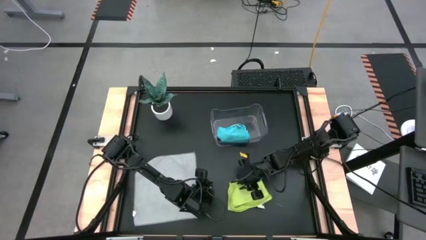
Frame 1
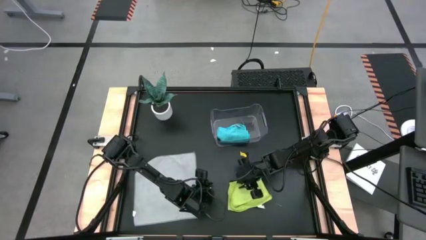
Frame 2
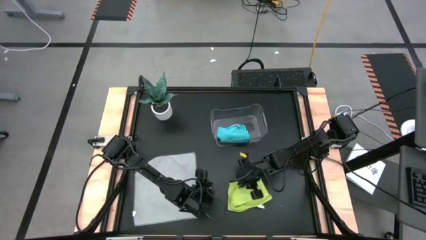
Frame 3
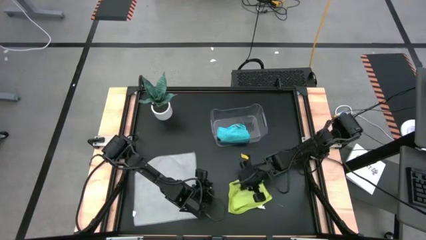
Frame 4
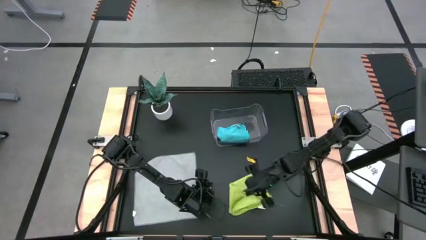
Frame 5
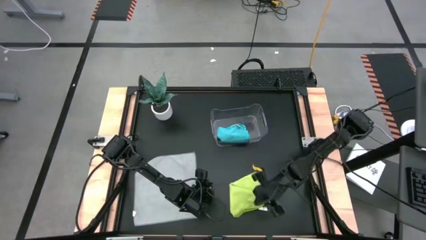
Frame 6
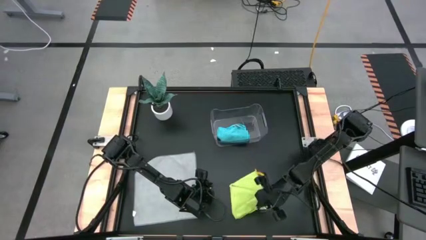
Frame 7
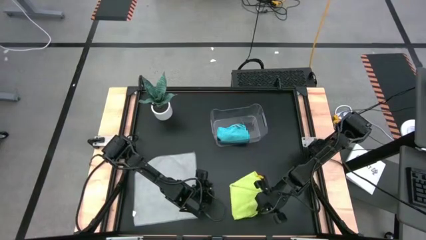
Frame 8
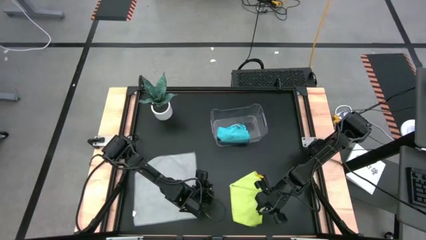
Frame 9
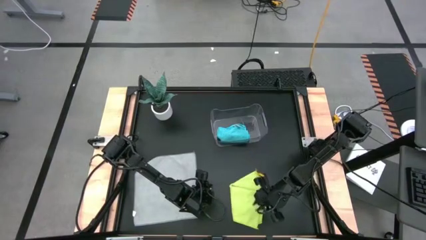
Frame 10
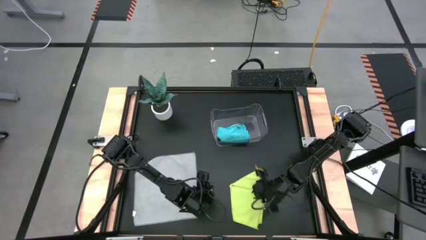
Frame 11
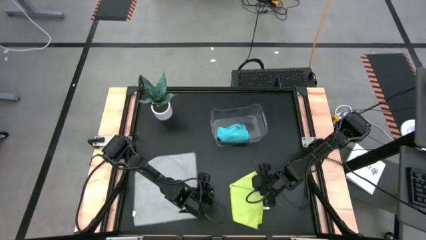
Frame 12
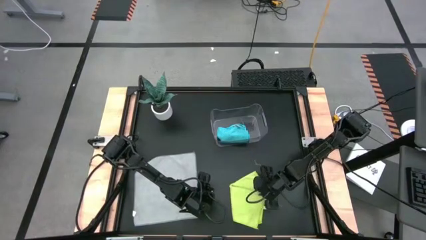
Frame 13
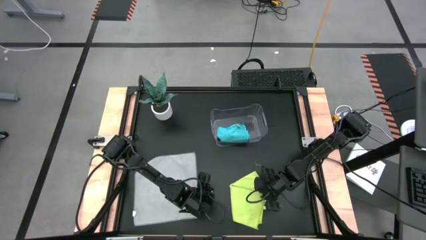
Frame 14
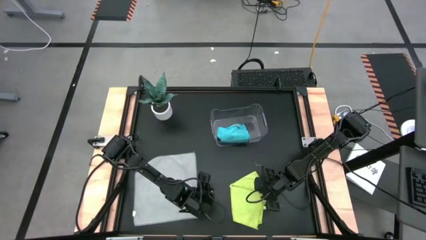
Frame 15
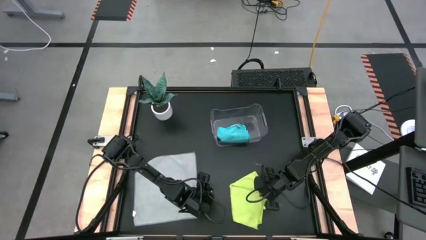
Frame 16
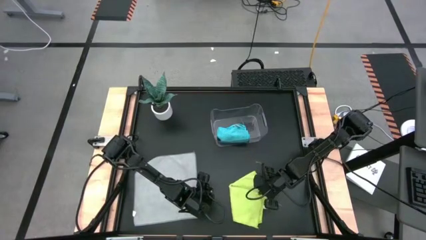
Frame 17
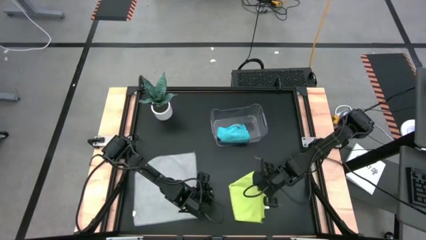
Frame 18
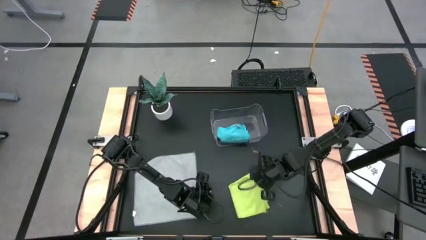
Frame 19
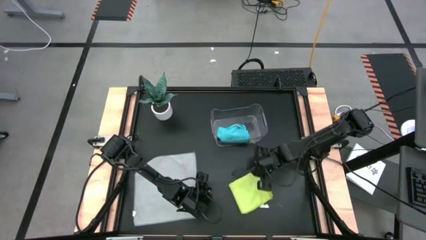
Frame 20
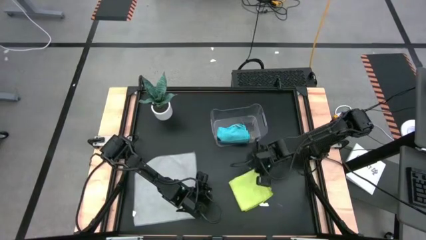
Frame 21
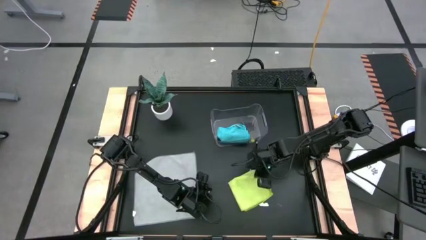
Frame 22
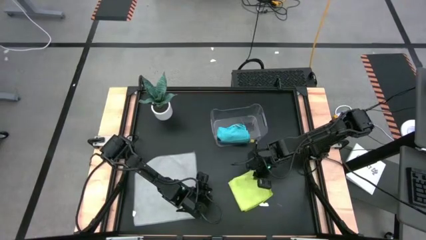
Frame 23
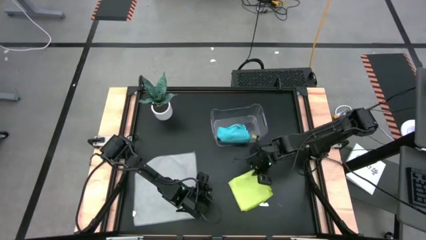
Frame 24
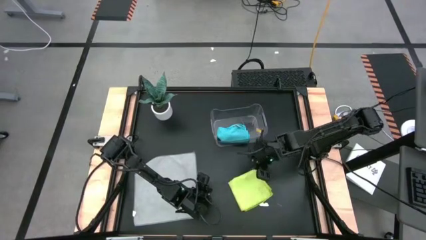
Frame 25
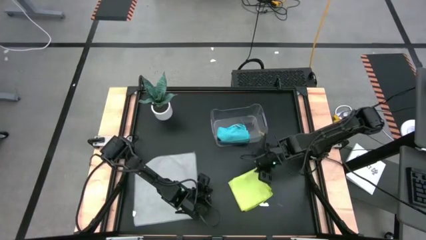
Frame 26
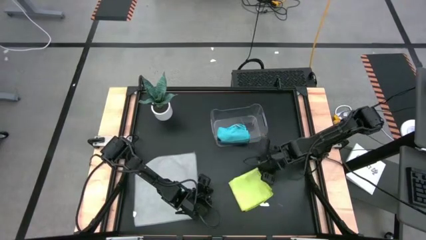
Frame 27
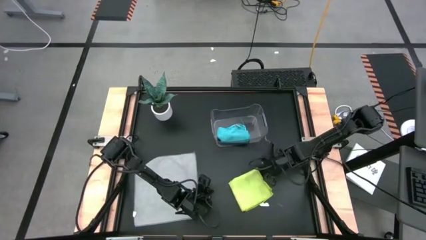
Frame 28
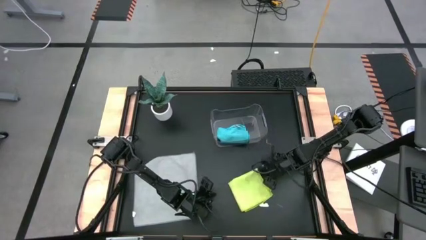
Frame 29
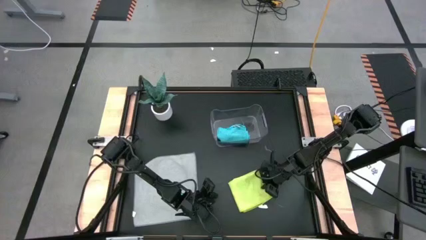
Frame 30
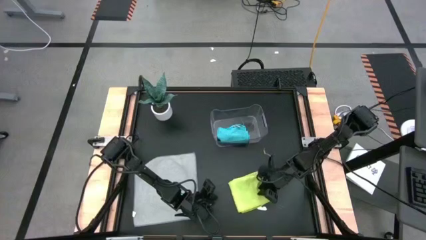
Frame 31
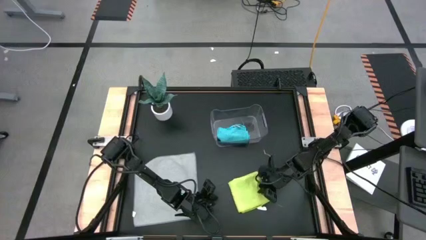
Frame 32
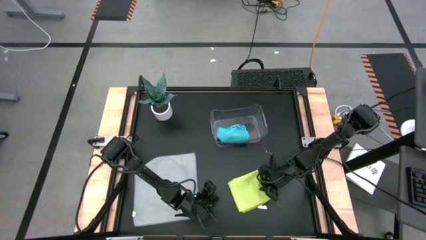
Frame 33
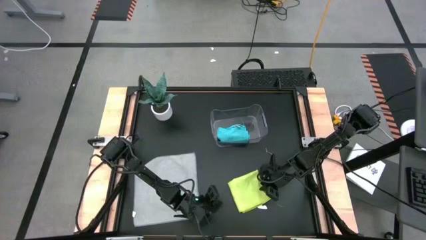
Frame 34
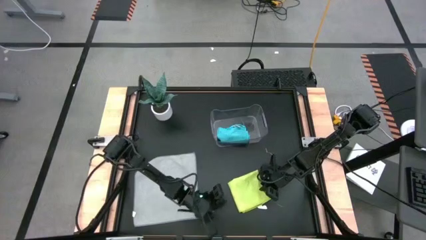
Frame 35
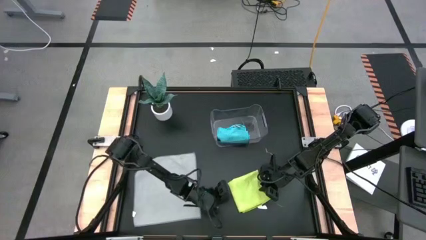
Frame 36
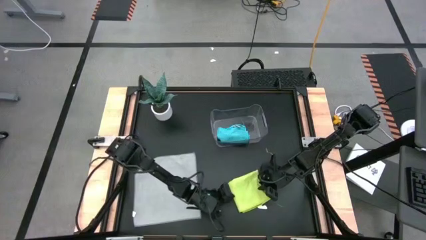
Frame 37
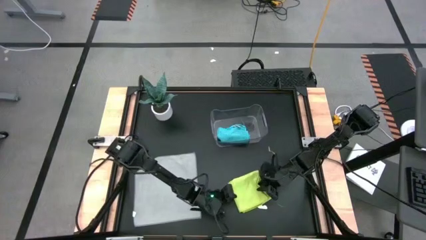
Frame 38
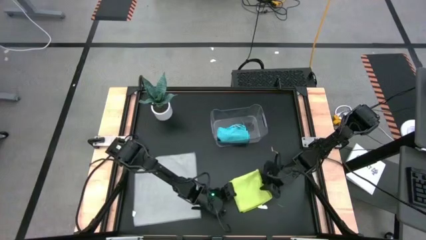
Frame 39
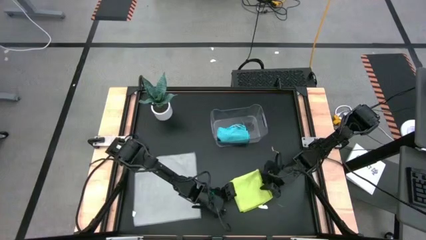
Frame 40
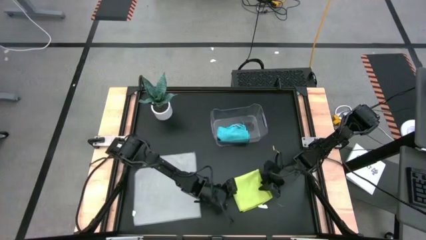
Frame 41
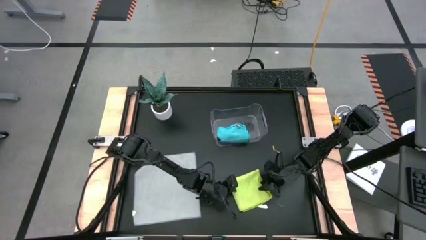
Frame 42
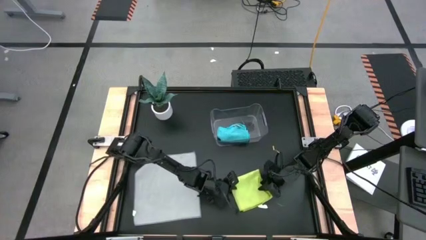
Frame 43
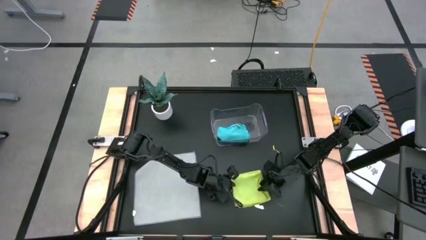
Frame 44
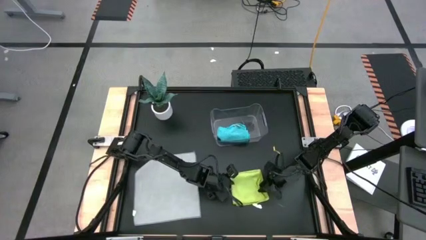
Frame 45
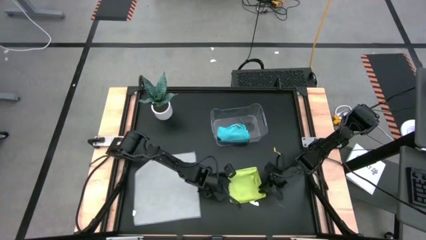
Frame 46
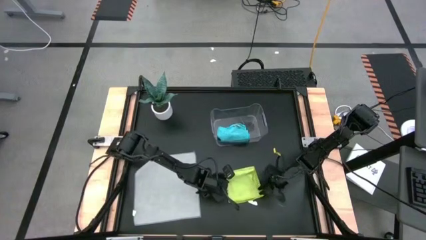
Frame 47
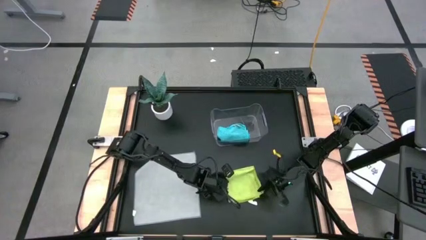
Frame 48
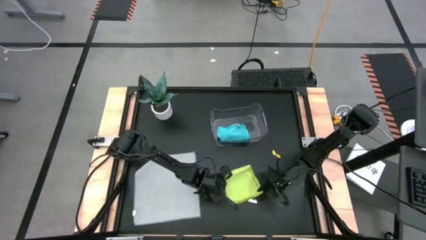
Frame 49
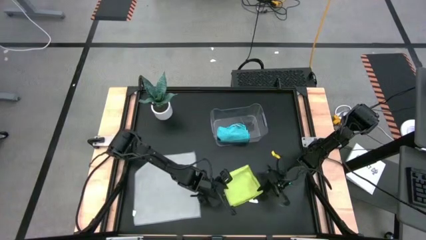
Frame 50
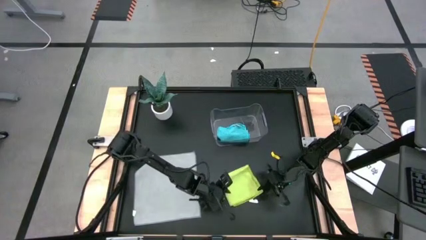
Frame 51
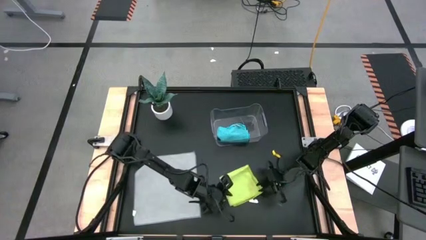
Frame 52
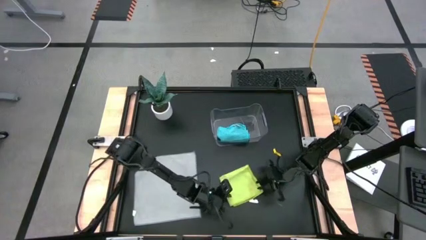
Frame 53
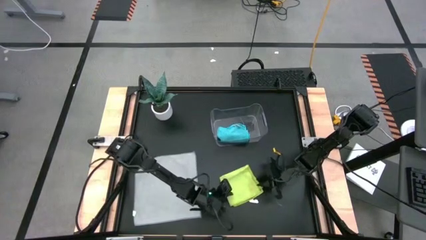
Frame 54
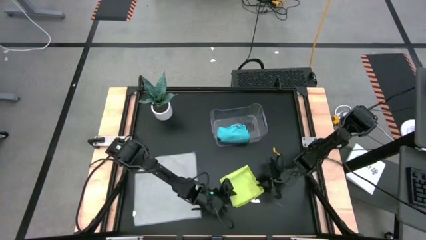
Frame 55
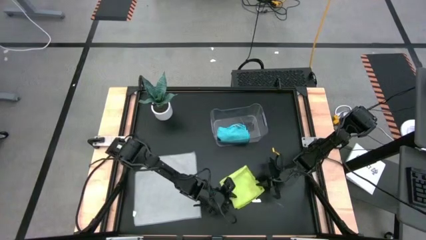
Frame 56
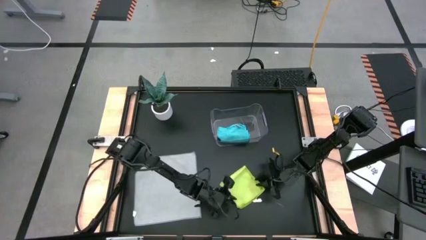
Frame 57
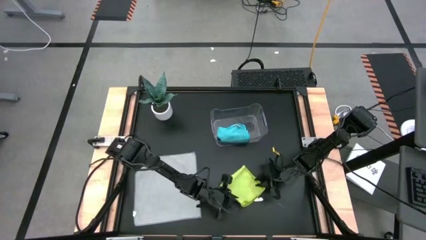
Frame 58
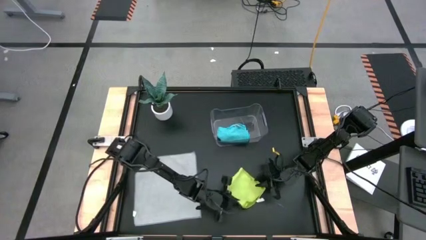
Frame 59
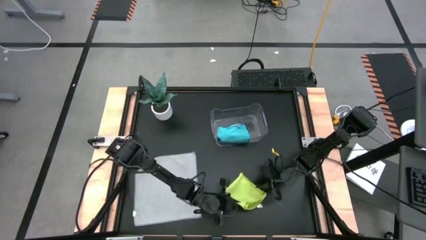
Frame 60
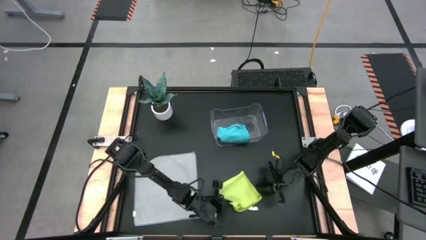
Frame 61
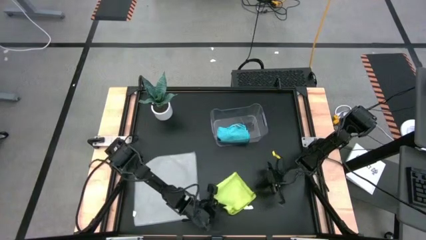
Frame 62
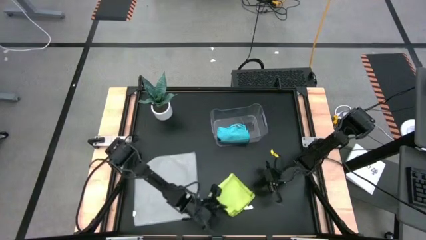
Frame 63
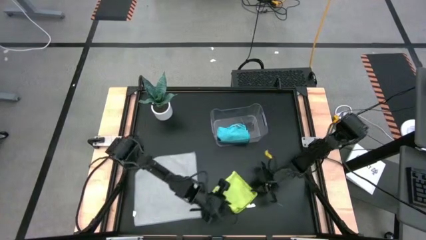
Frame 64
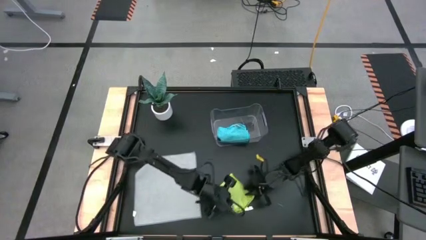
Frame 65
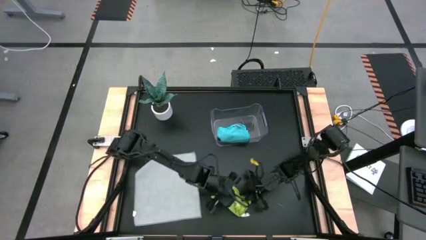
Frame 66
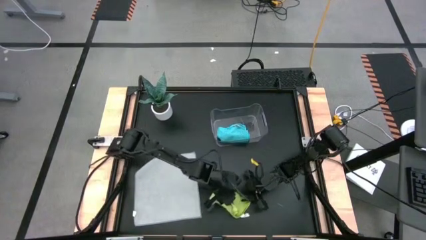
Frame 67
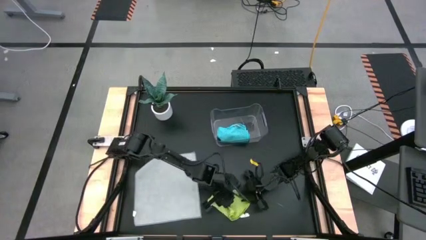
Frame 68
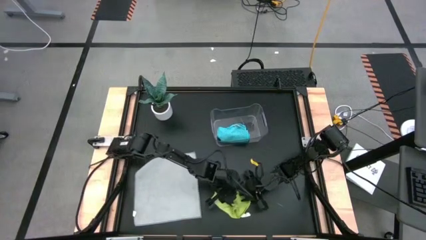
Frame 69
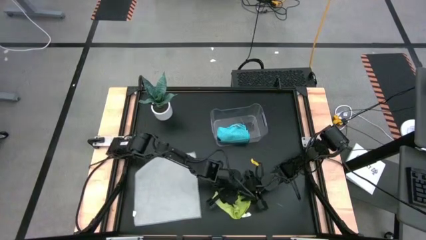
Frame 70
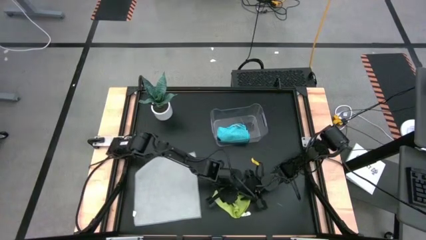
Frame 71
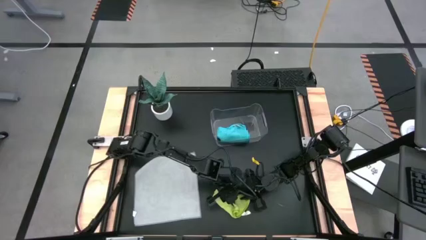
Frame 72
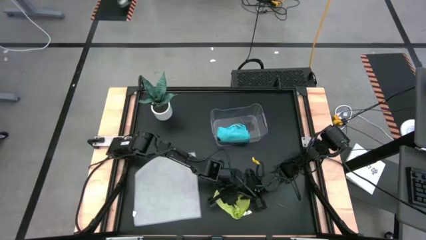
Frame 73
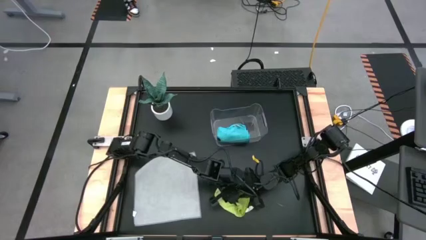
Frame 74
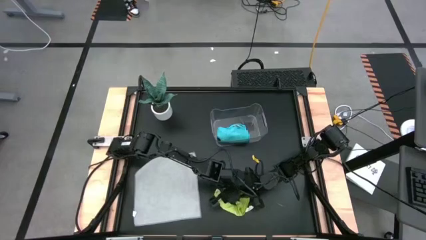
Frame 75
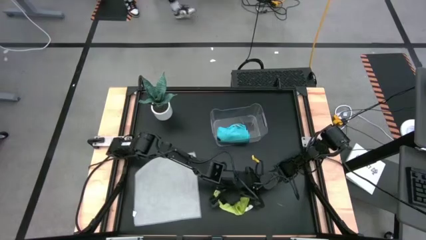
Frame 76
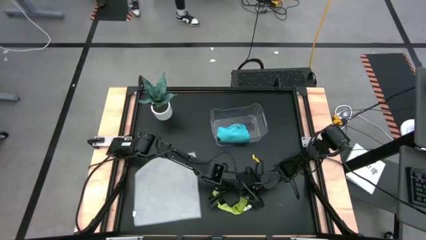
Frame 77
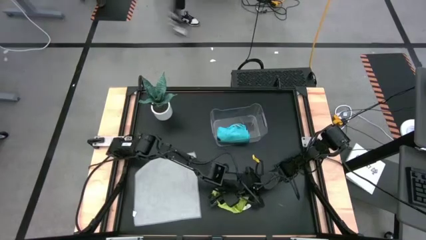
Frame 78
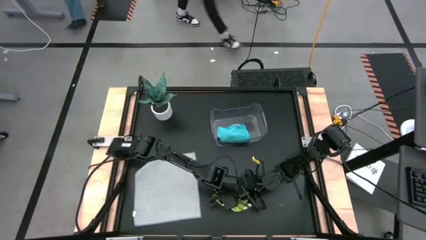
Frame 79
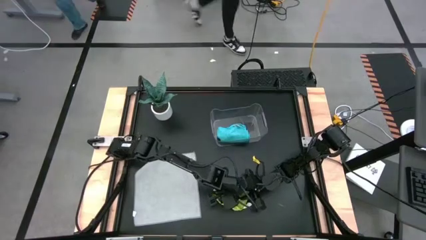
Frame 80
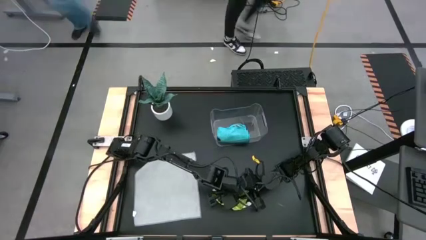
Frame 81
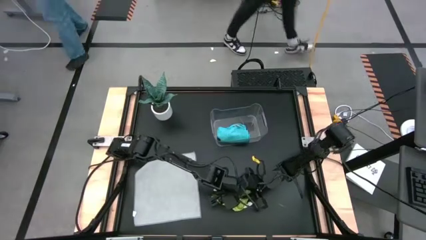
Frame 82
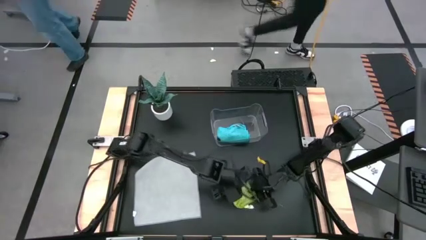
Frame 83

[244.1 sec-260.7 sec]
Task: Fold microfiber towels
Fold the green towel
